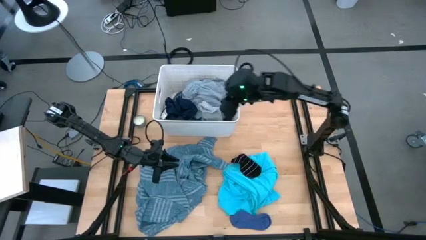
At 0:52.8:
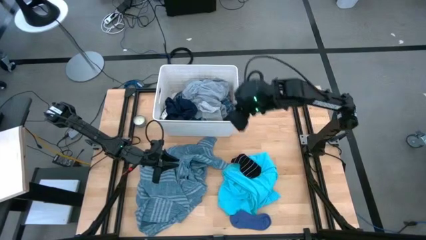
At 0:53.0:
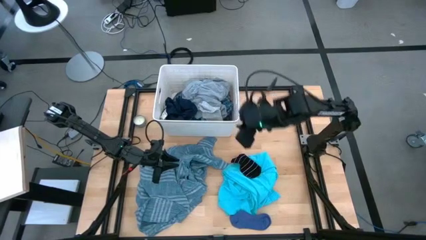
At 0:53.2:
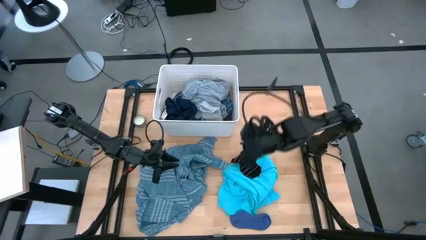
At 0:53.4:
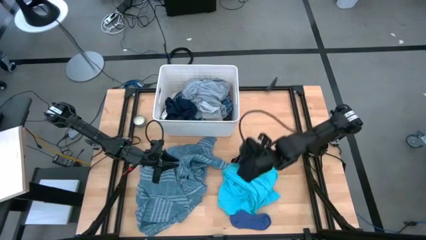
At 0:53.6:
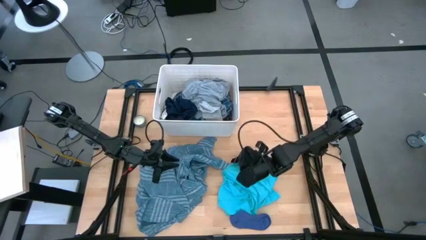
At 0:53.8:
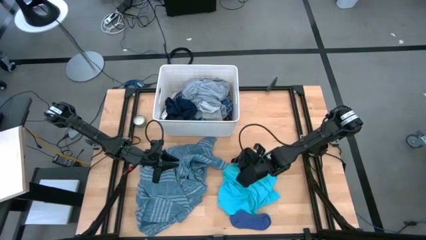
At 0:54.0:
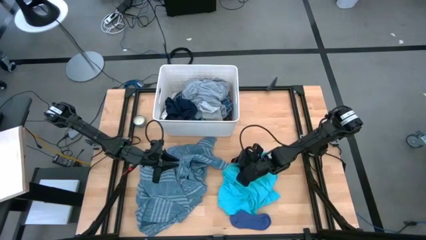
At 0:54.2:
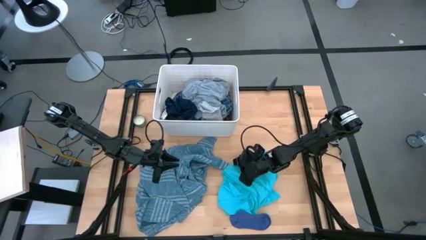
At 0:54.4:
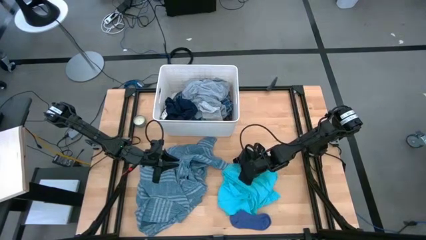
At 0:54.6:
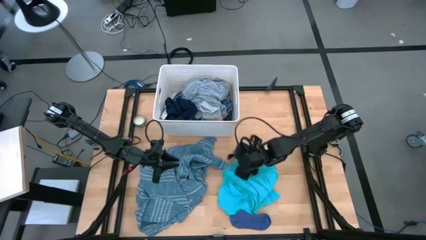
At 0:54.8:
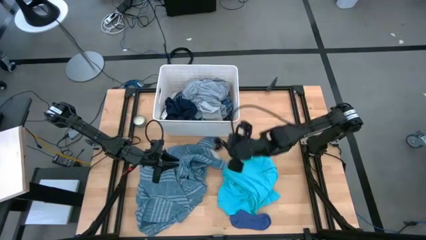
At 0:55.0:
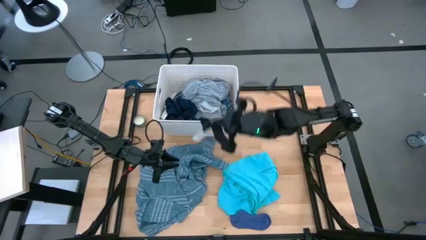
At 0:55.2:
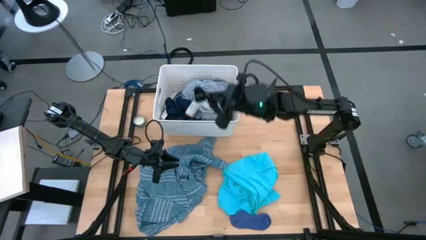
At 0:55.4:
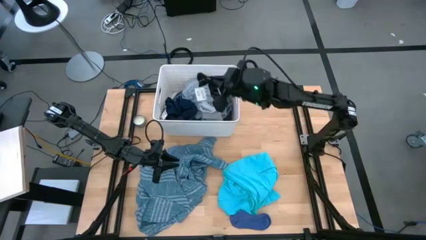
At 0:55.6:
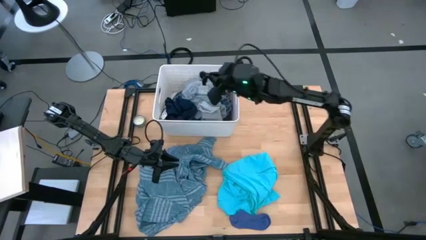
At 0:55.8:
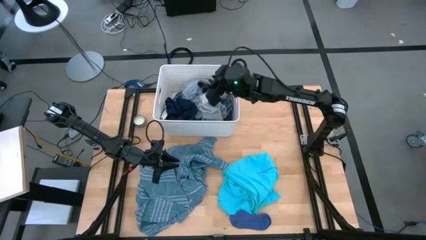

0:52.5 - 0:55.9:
Task: Sort clothes
Put the black sock into the white laundry bin

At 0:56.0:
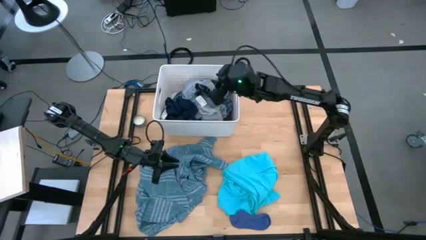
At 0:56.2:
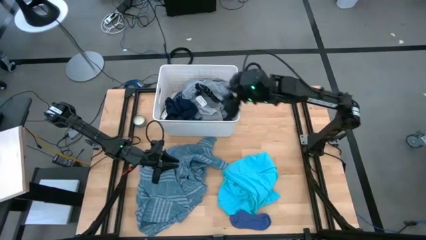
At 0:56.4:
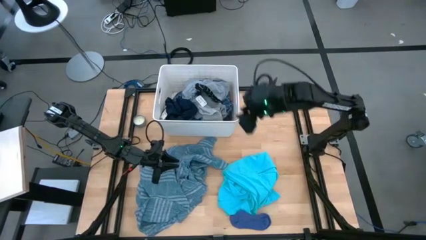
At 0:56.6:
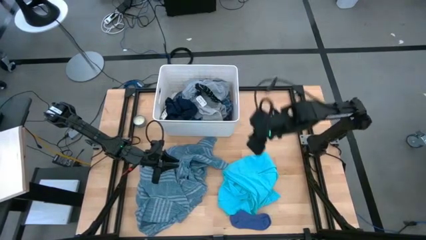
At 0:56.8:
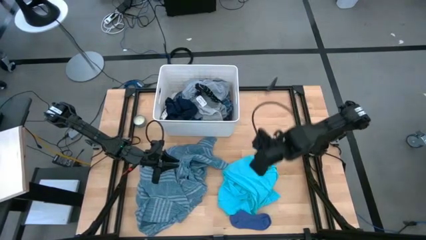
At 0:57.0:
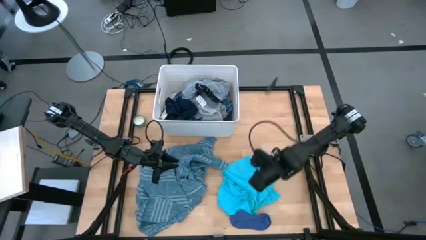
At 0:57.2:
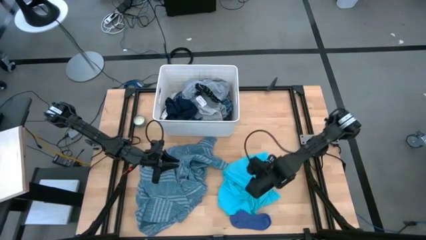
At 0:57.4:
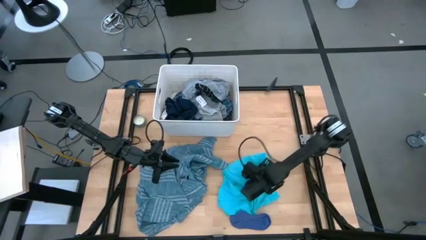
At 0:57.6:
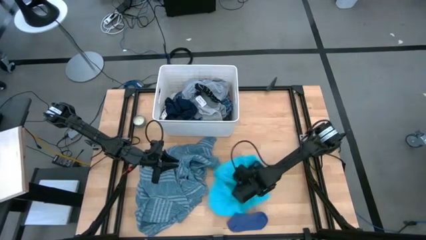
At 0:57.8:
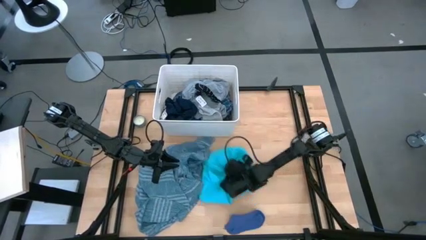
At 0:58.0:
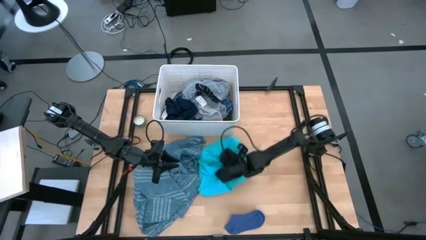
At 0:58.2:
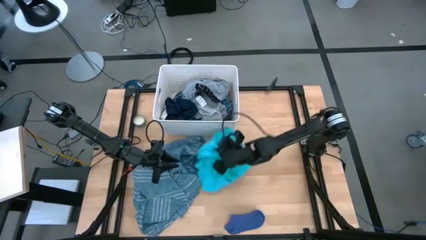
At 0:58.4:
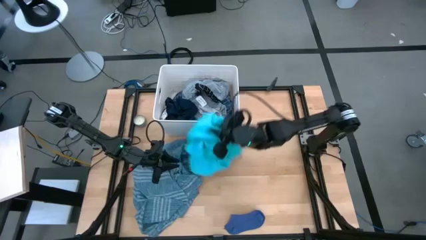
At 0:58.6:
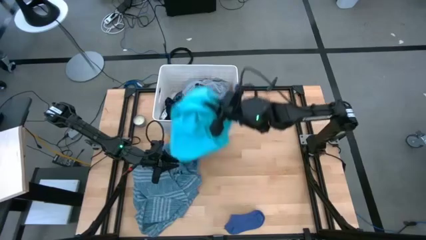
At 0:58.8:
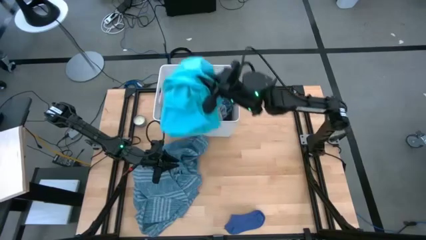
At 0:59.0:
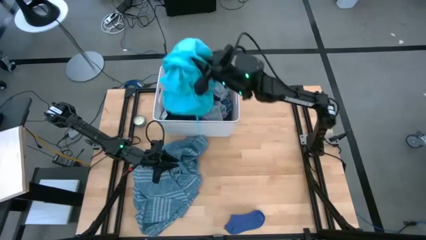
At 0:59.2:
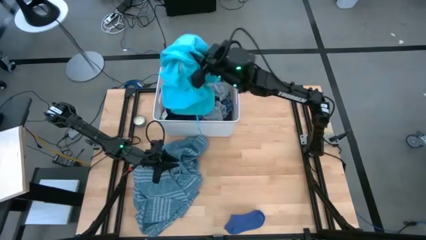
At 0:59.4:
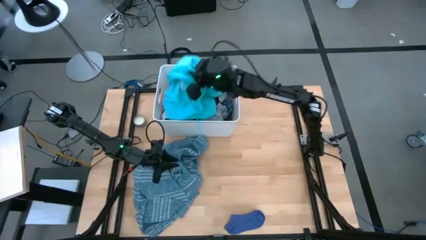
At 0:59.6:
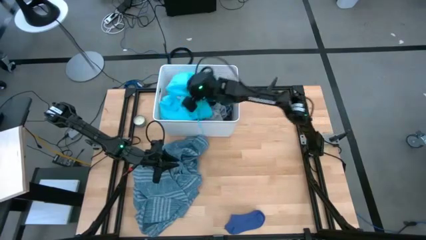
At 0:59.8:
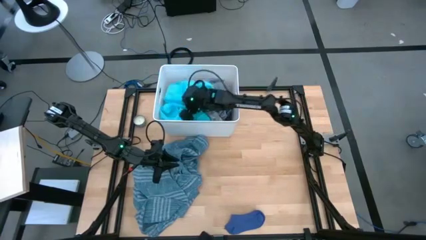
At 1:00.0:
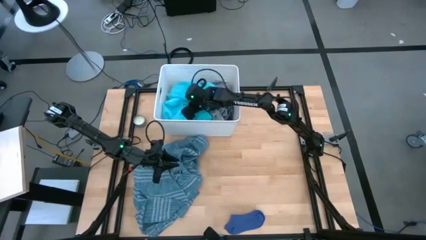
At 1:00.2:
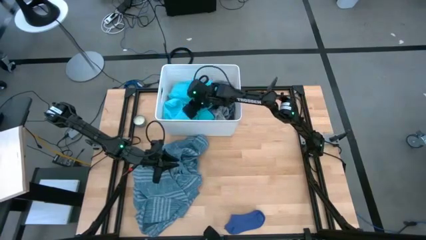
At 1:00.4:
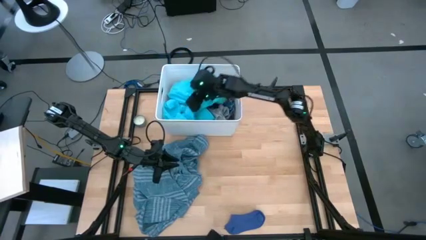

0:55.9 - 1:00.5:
Put the light blue short into the white laundry bin

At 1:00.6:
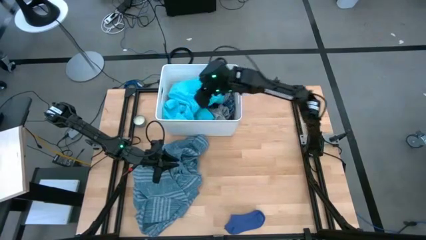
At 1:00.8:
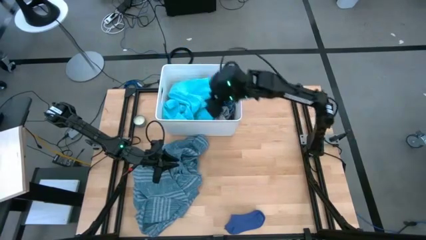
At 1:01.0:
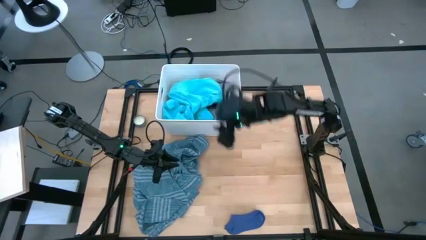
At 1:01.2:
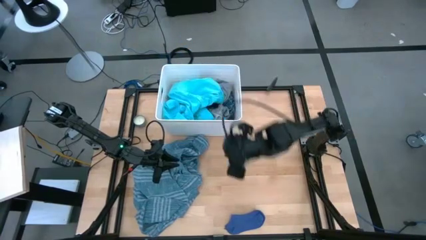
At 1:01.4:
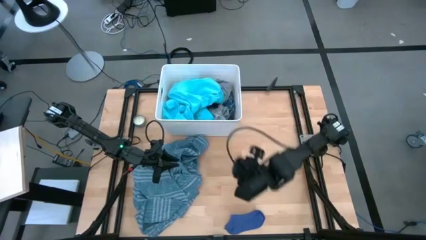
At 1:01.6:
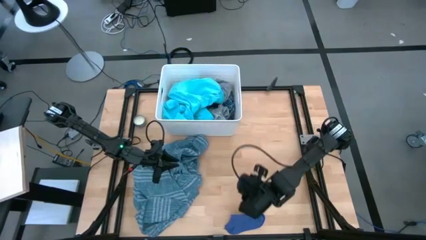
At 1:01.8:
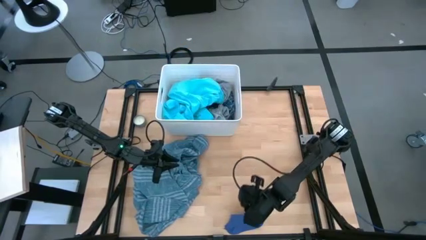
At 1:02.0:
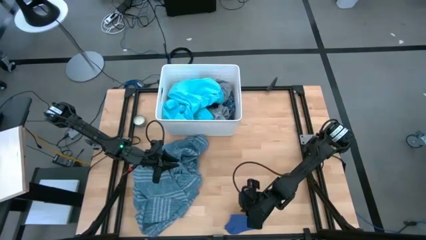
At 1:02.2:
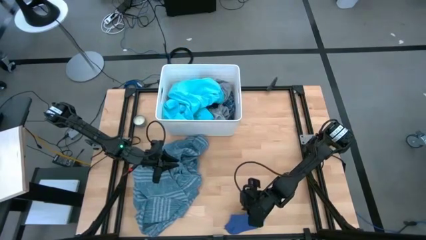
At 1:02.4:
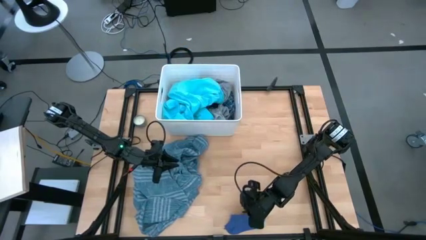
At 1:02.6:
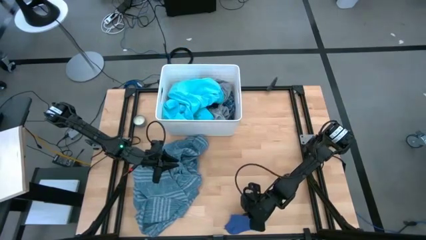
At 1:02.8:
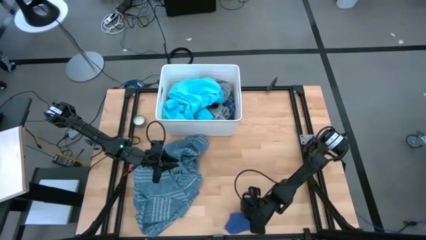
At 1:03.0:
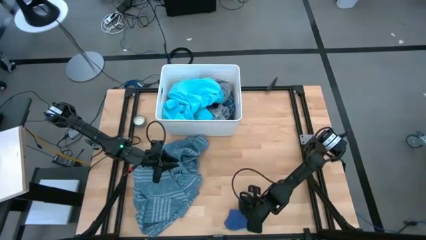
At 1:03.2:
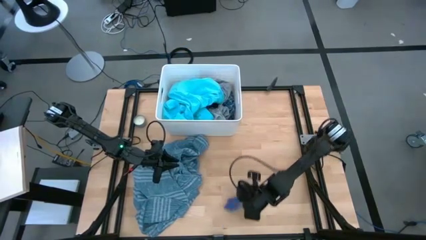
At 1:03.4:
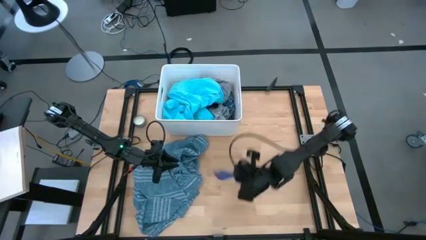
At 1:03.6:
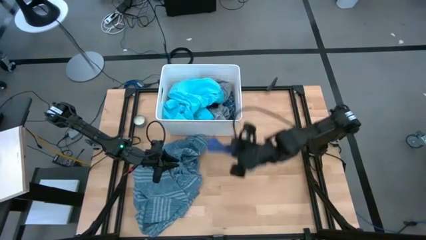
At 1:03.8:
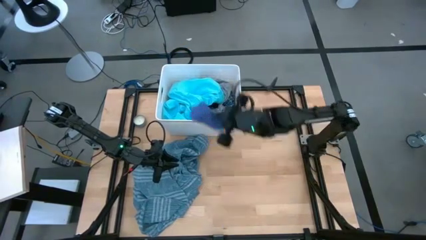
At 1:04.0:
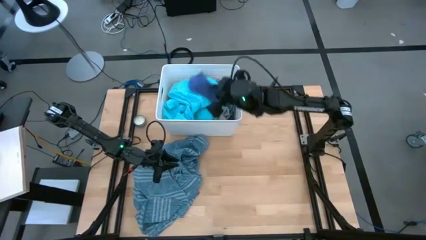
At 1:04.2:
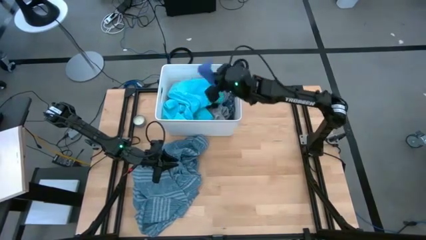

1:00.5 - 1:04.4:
Put the blue sock into the white laundry bin
